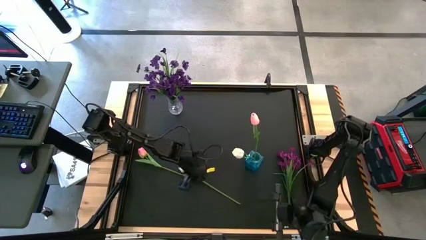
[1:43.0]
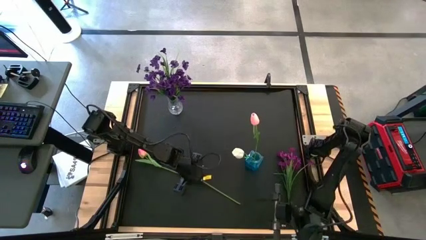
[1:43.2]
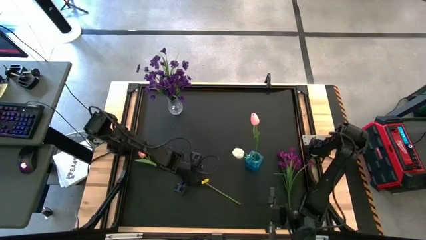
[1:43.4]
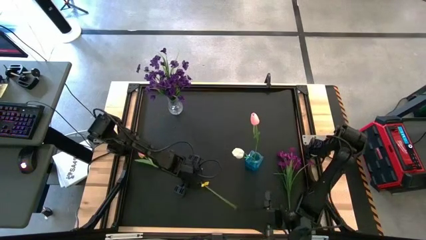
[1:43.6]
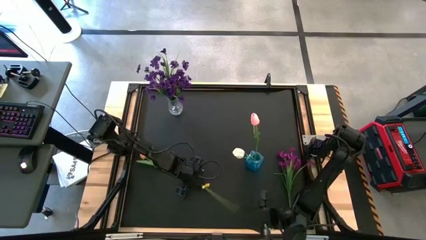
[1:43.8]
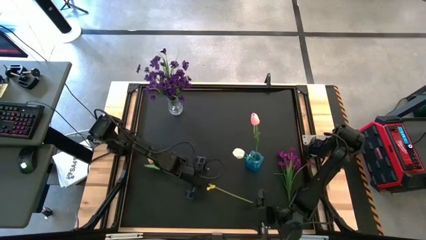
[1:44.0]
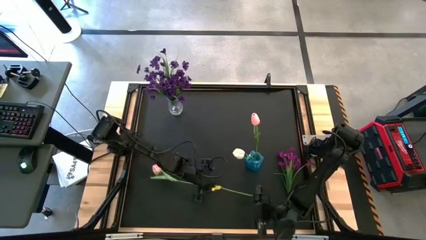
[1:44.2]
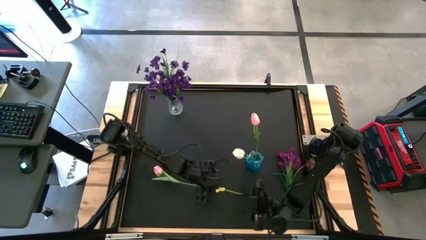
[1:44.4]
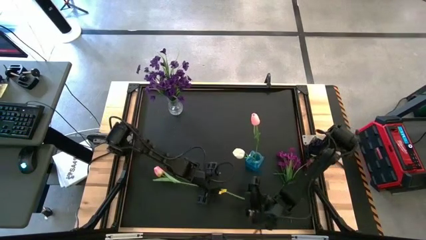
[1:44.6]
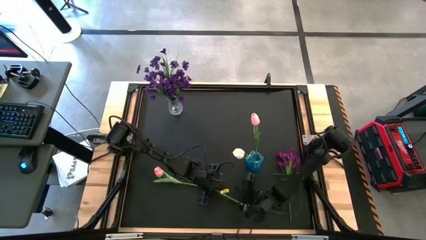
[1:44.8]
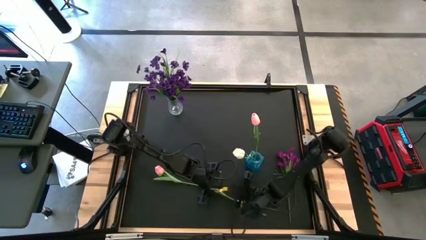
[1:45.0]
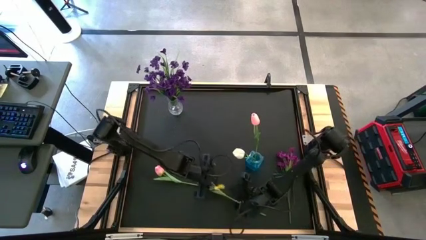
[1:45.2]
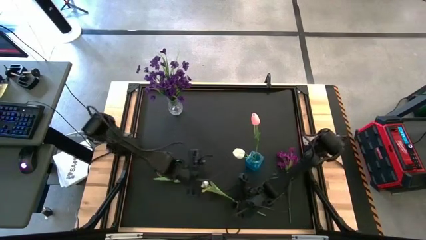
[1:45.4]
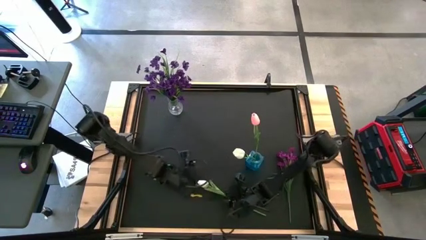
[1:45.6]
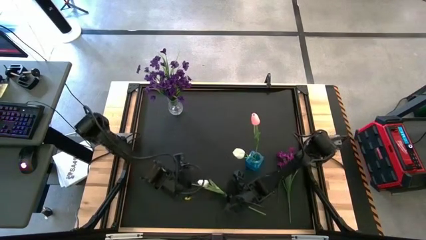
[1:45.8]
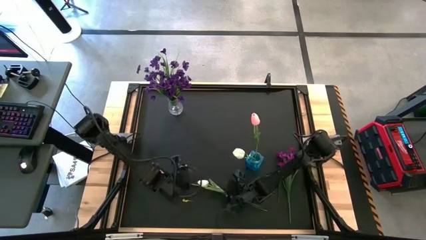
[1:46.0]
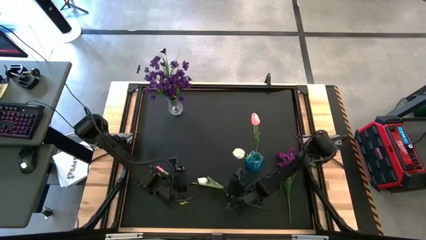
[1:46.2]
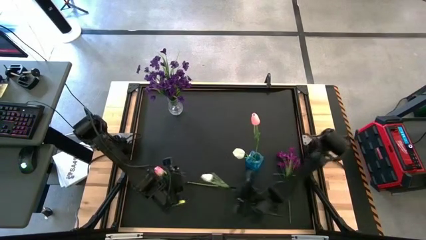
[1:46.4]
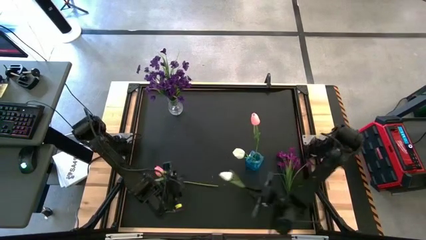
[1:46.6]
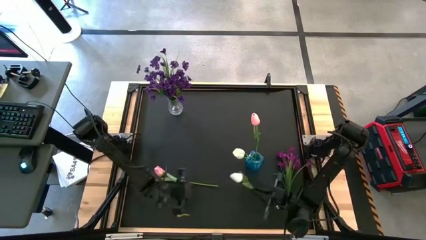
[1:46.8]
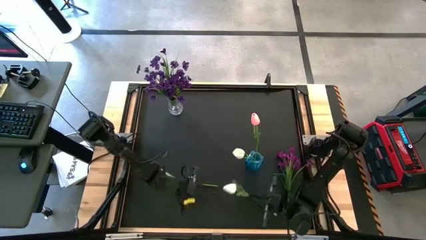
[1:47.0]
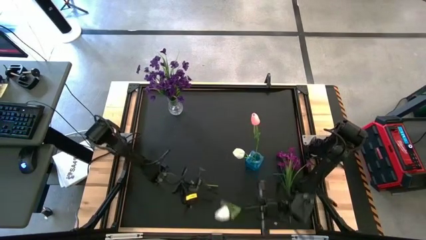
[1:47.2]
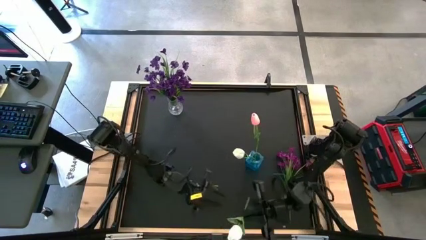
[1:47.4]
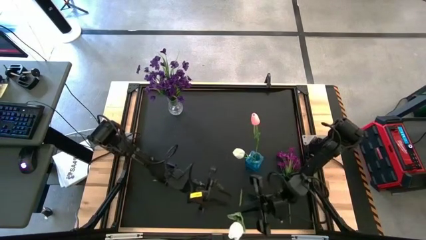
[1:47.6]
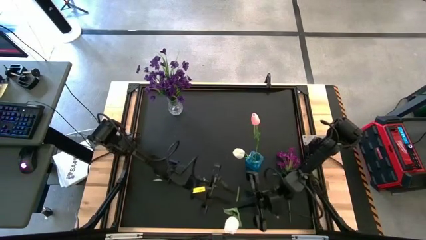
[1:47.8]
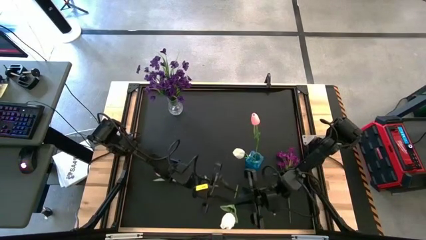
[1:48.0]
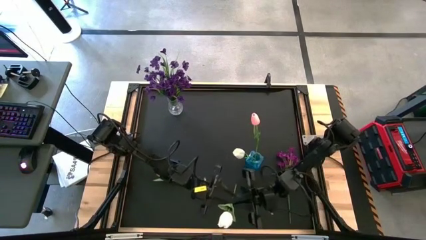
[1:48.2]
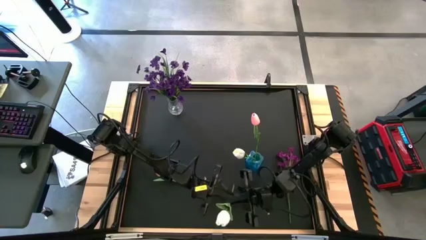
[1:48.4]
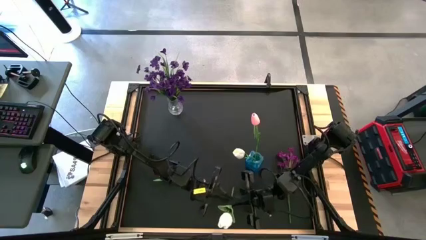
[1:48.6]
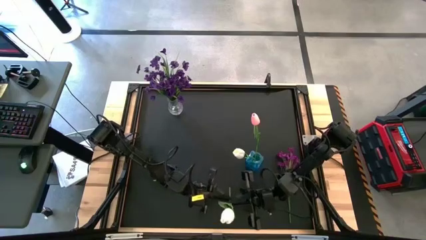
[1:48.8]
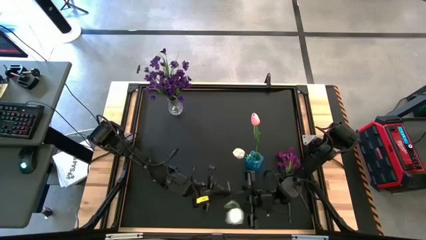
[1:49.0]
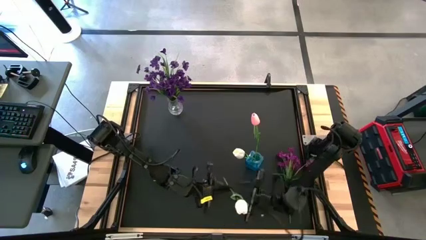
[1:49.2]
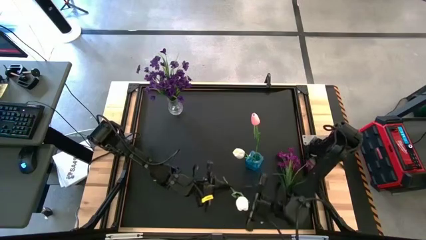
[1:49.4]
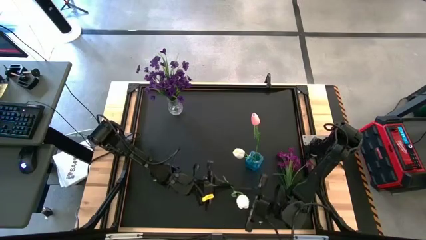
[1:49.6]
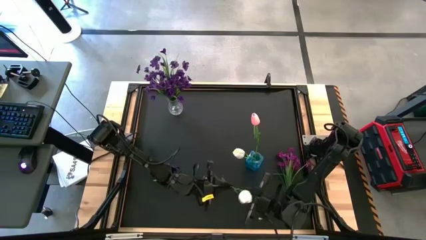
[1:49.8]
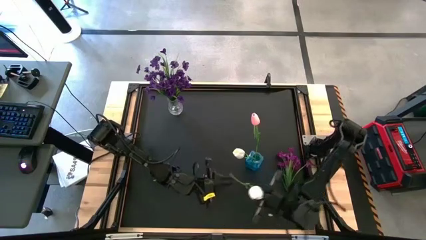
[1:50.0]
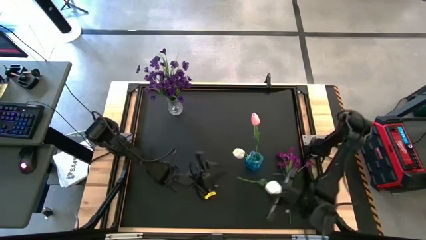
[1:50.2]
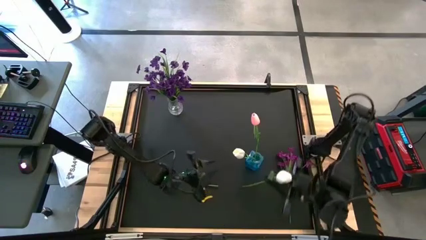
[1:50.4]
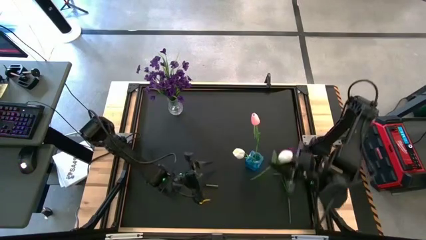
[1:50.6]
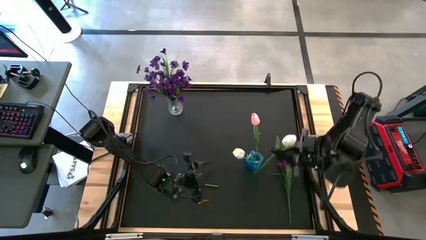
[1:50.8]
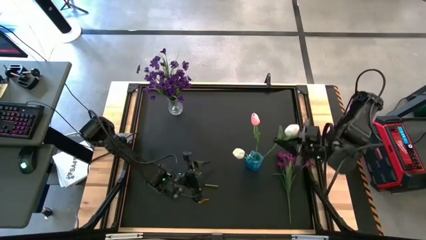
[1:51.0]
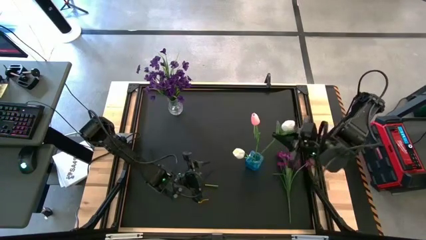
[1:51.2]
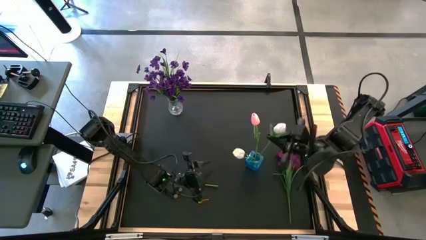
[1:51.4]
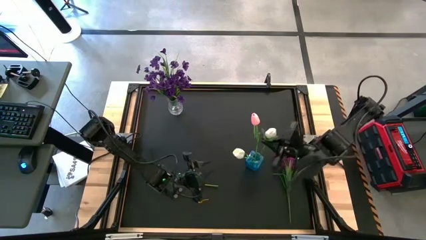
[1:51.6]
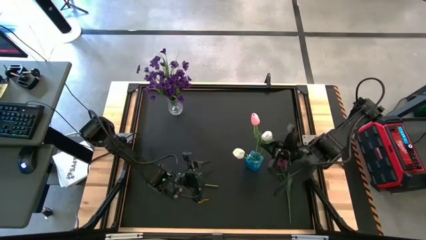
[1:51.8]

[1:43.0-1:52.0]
Task: Sort flowers into vase by color
Put the white flower into the transparent blue vase

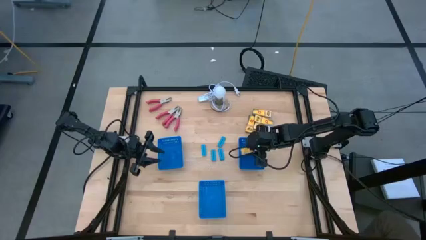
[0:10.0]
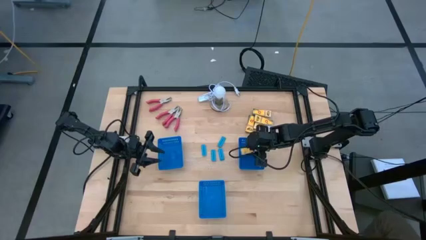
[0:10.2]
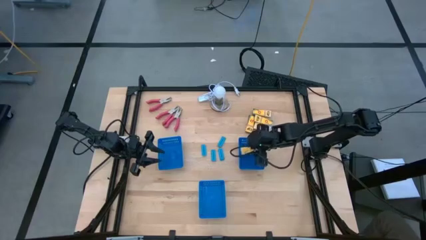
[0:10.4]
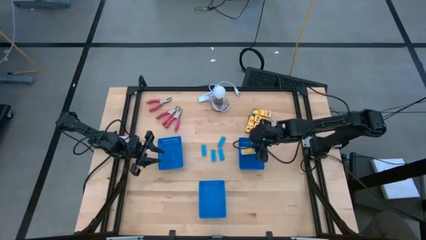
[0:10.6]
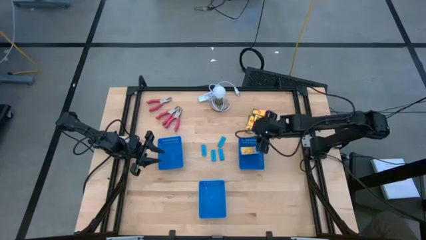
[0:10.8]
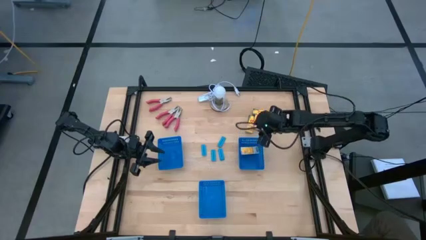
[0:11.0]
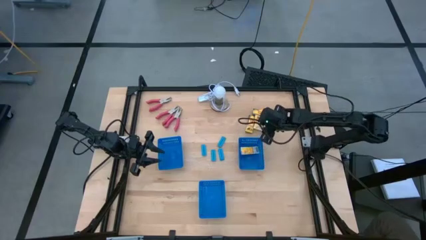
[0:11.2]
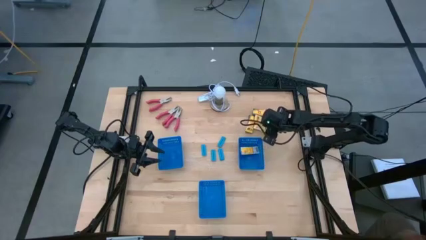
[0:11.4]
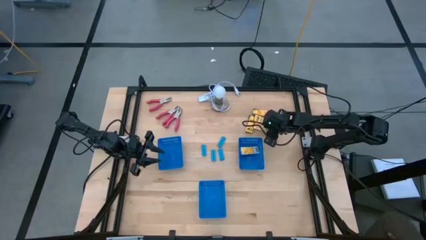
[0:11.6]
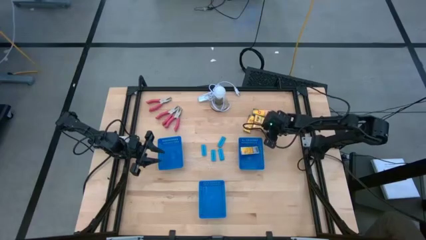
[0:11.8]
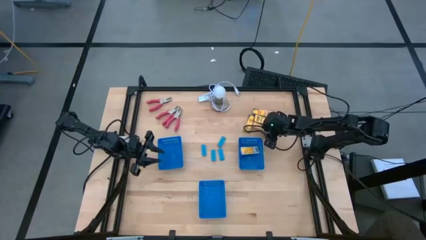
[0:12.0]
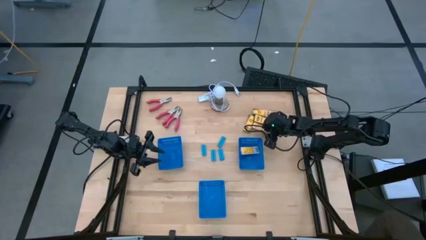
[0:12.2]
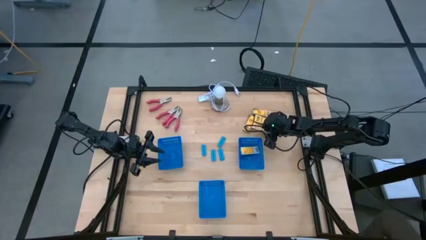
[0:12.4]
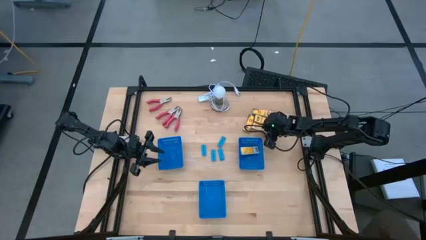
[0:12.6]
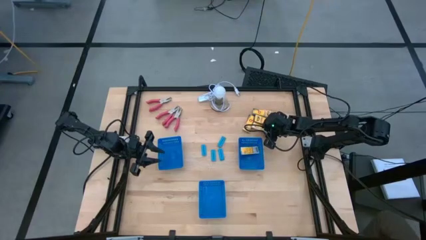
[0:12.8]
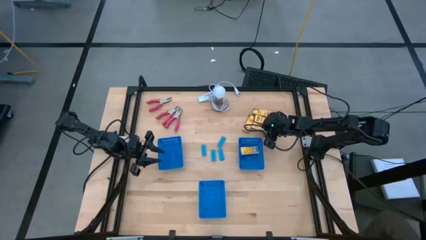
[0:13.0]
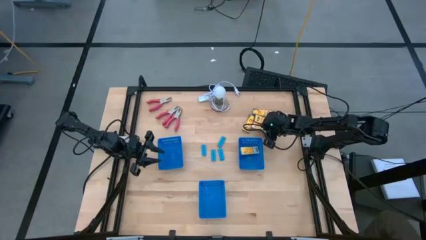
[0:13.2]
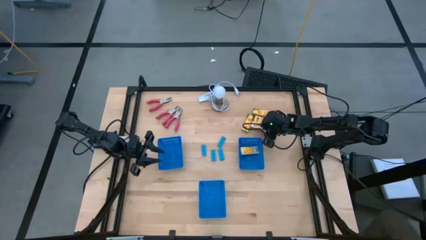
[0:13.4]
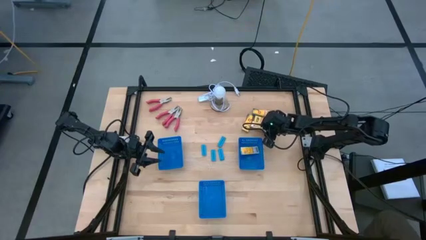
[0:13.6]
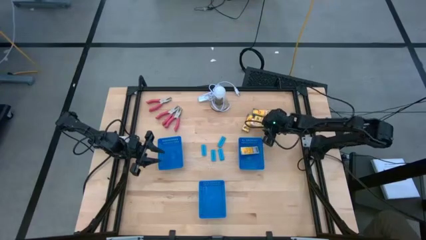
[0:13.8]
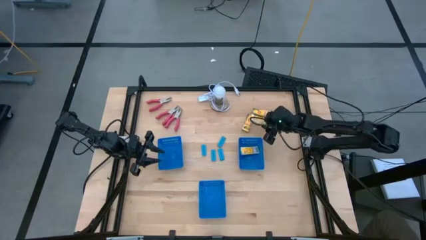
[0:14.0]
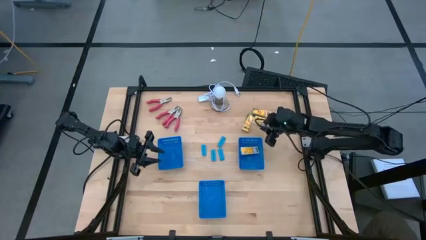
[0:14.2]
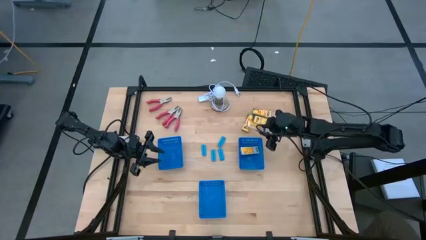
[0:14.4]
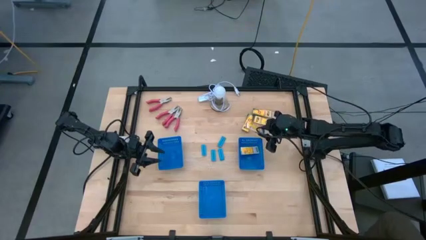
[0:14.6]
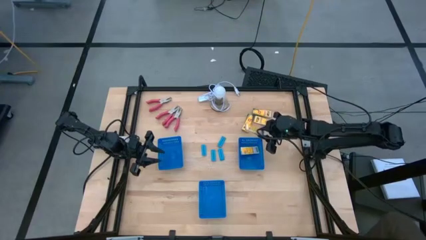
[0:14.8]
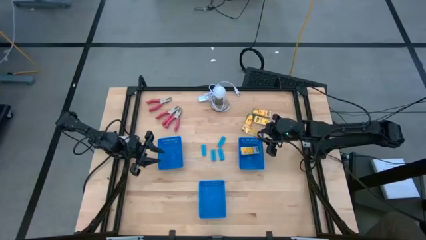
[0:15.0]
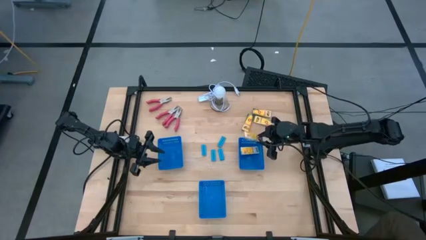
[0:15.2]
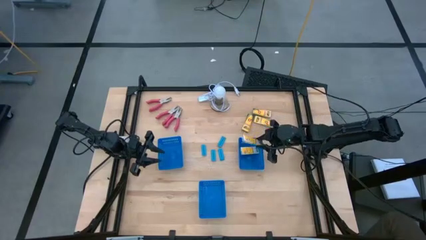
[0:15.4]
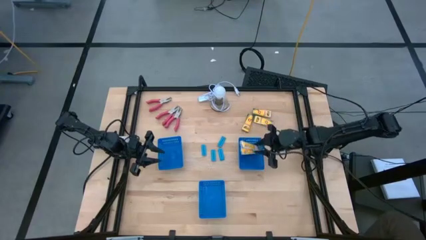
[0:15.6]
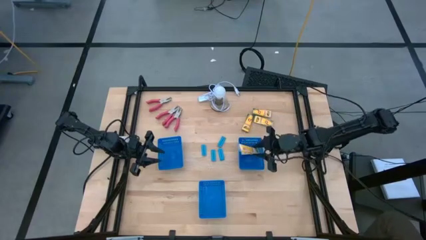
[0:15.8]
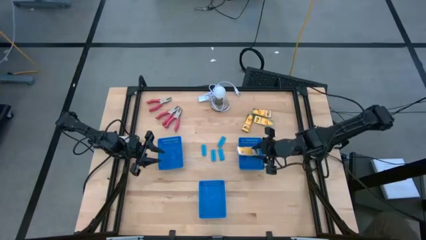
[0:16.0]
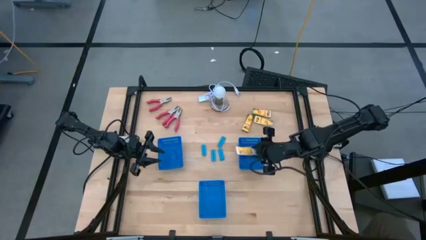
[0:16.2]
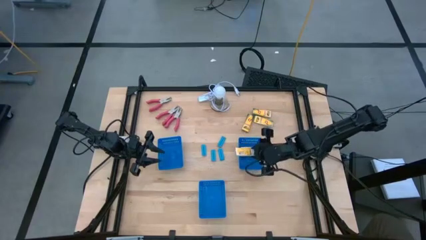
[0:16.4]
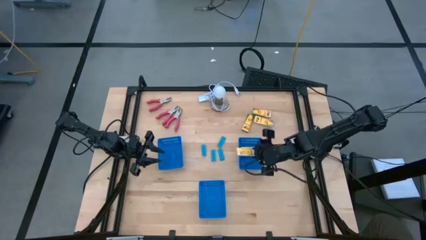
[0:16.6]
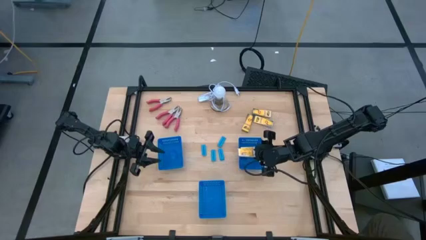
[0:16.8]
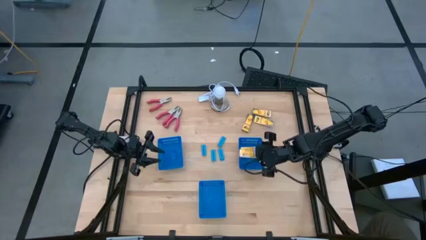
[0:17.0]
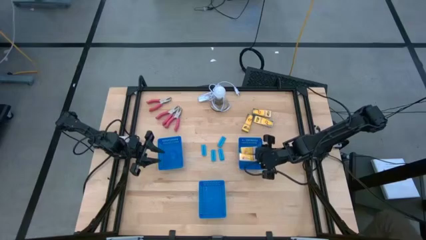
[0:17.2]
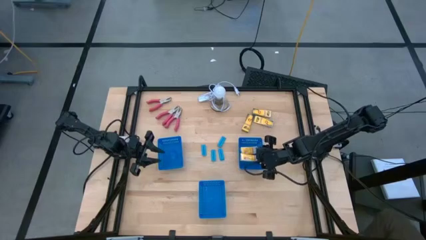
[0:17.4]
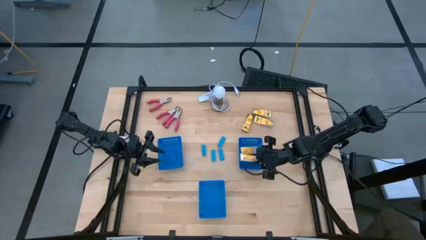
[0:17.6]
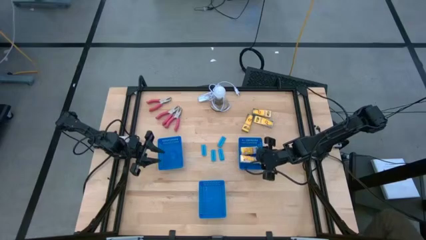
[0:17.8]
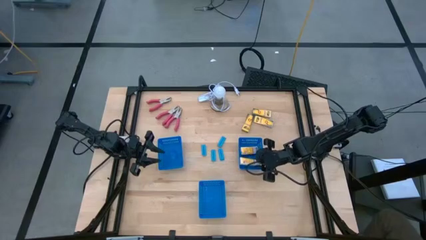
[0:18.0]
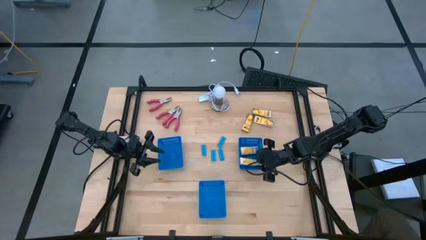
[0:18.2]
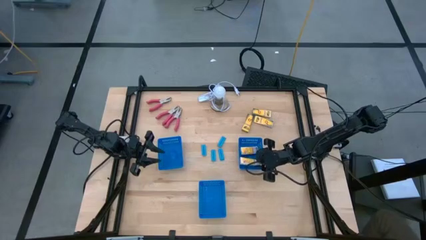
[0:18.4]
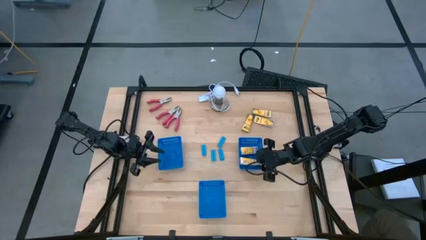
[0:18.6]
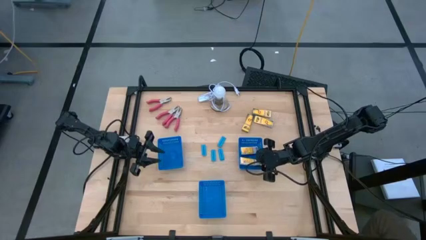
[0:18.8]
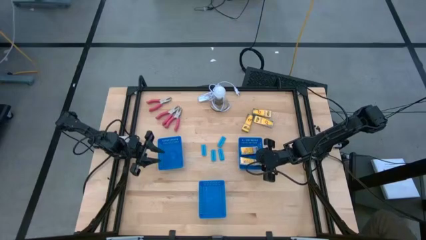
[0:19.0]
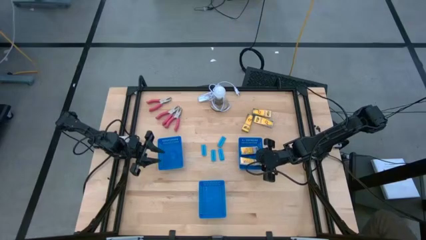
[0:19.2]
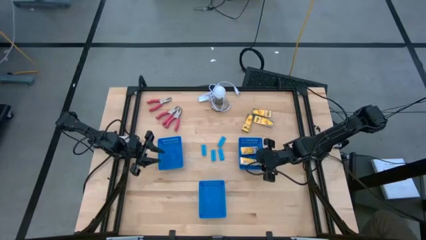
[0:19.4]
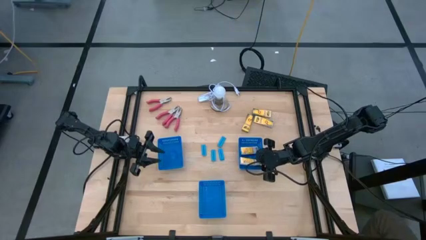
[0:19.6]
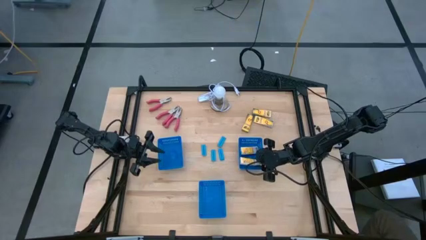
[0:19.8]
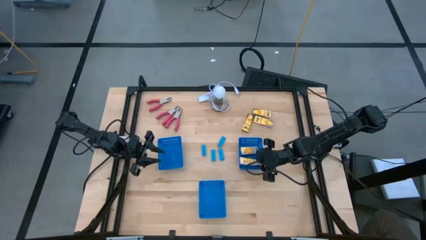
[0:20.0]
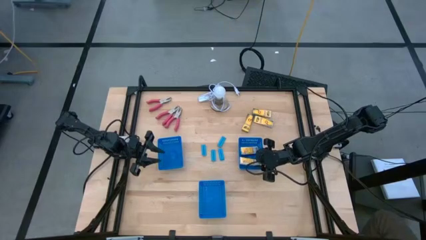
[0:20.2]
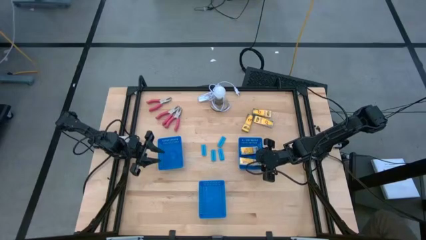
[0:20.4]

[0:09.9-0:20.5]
Task: Pick & Place School Supplies
Put the yellow crayon box into the top right blue bin
